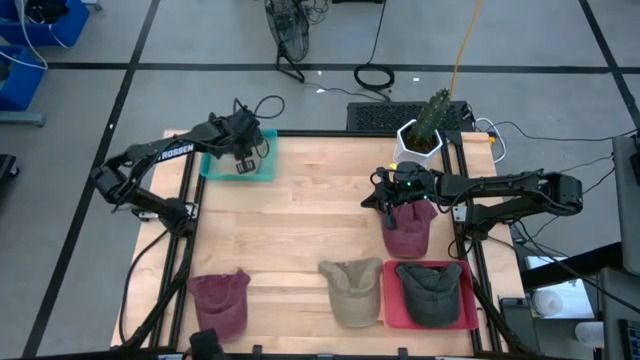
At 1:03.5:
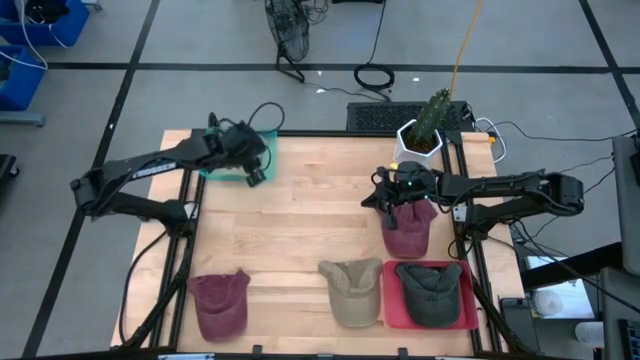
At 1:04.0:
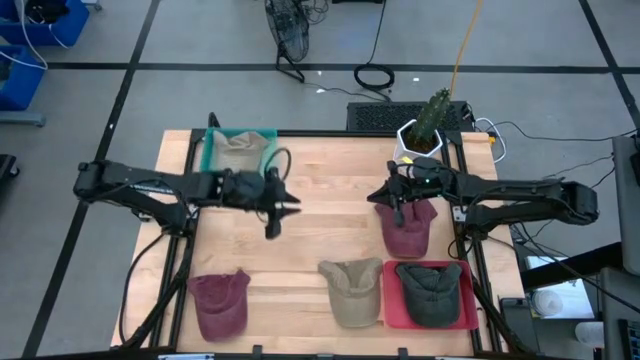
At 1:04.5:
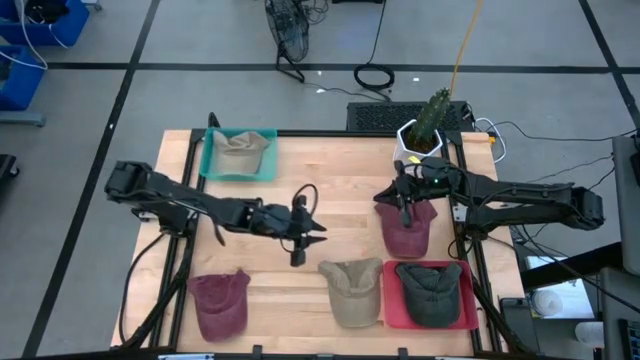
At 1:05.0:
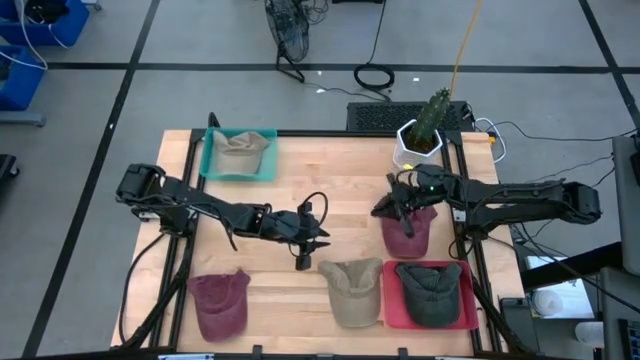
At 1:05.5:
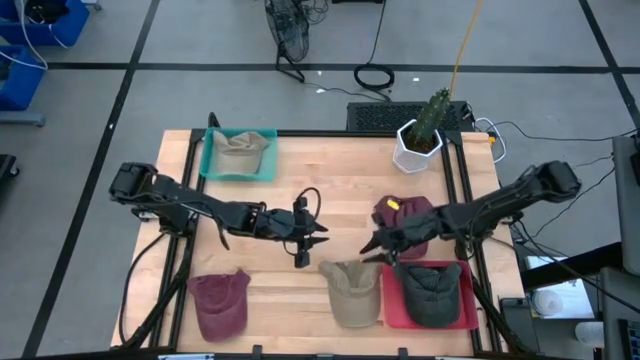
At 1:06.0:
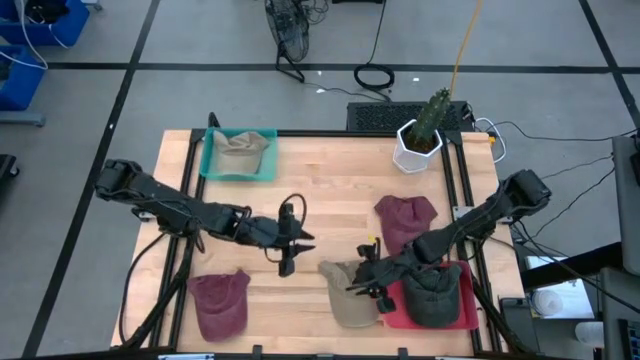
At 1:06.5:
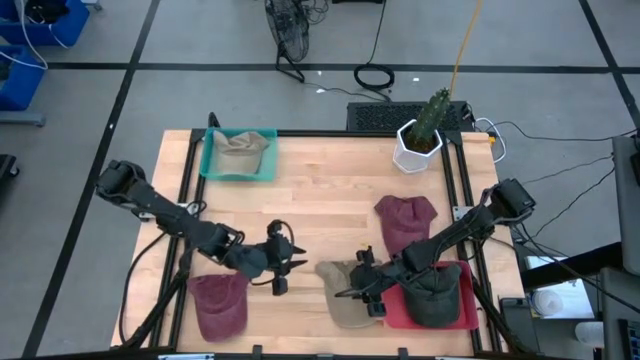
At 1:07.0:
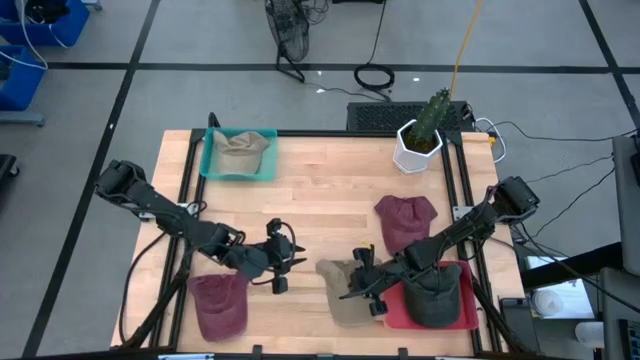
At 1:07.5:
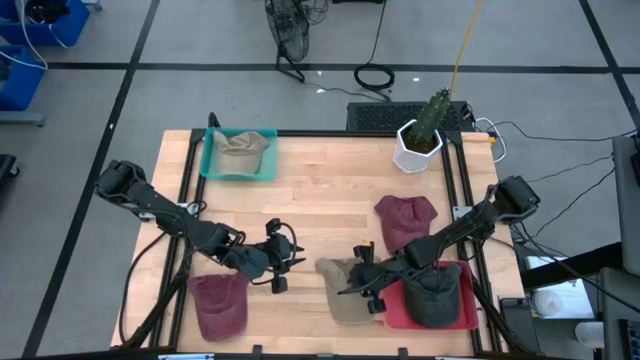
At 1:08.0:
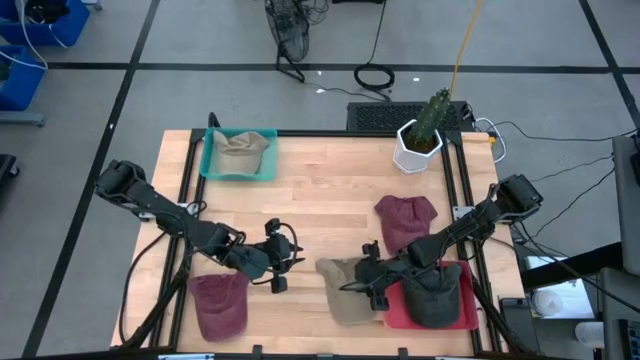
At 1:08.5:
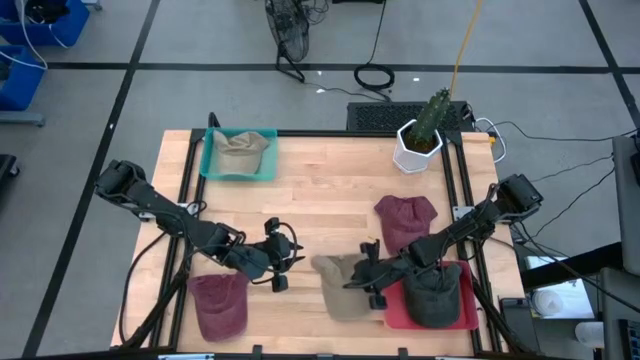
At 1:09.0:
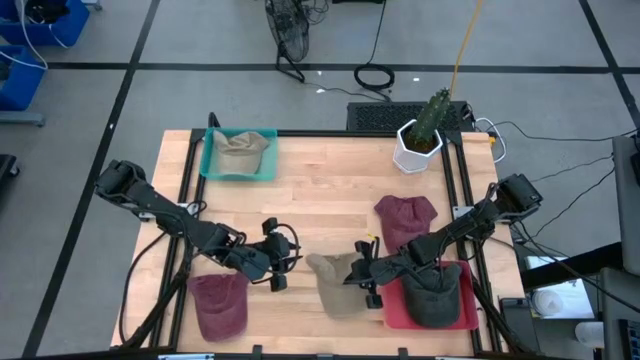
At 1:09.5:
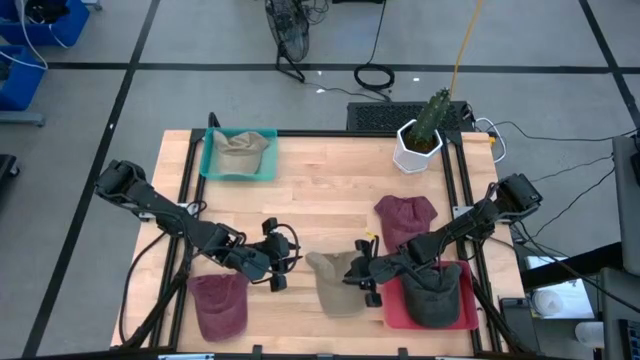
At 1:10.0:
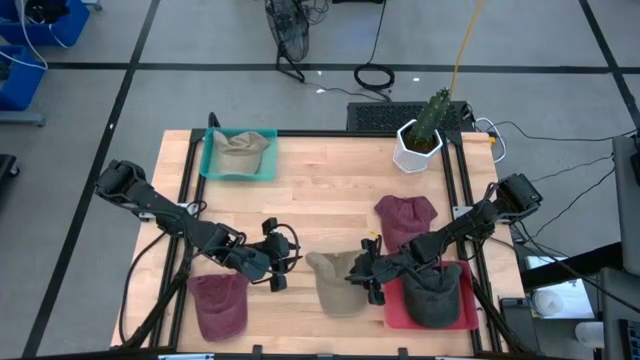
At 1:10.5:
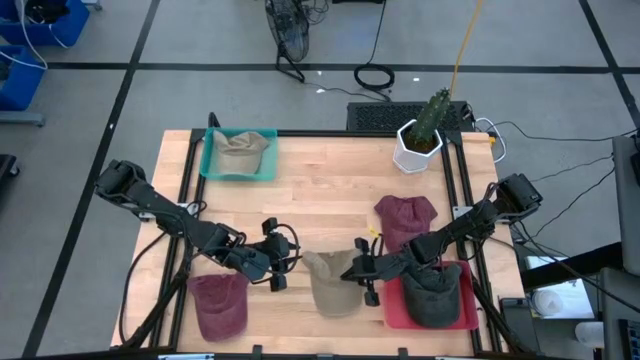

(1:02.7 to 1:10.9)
Task: Pick & Place hat
Put the brown cap into the green bin

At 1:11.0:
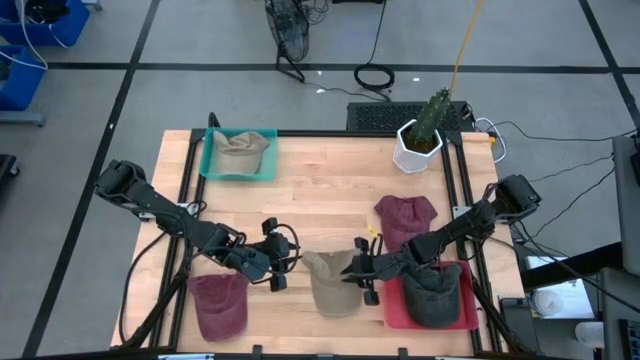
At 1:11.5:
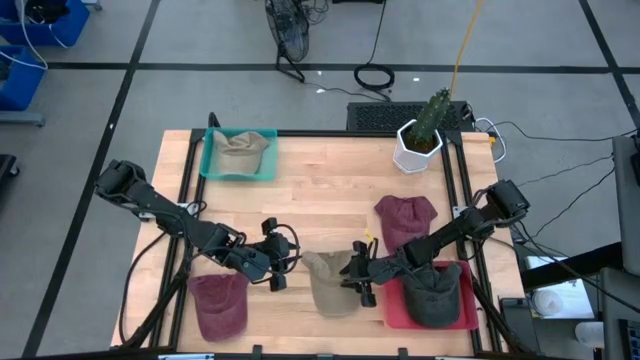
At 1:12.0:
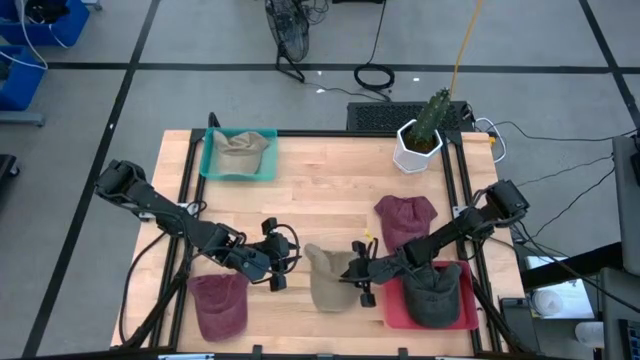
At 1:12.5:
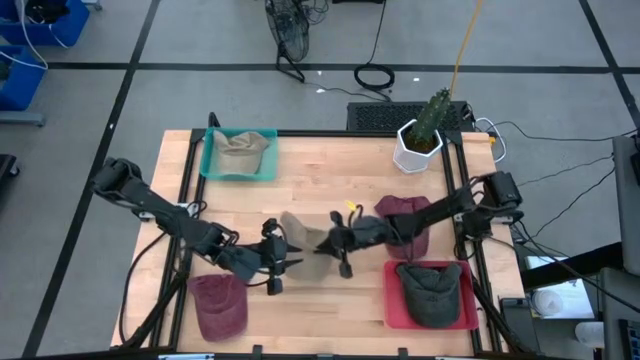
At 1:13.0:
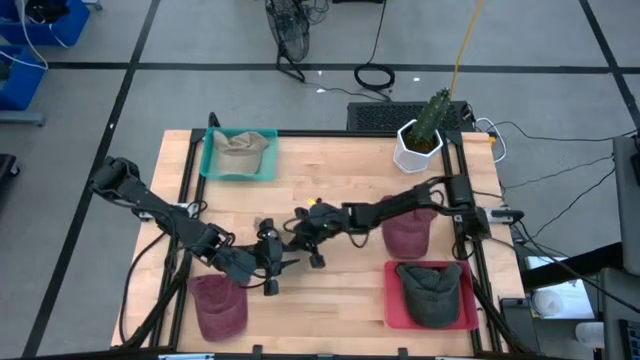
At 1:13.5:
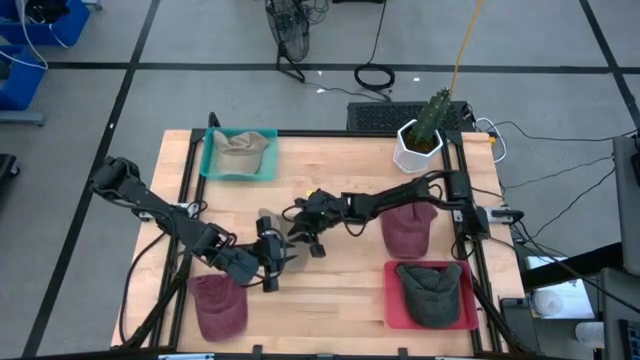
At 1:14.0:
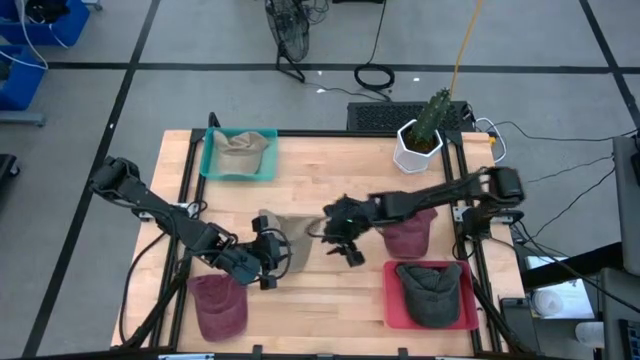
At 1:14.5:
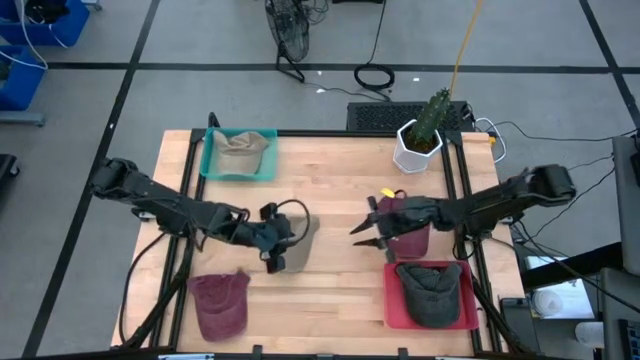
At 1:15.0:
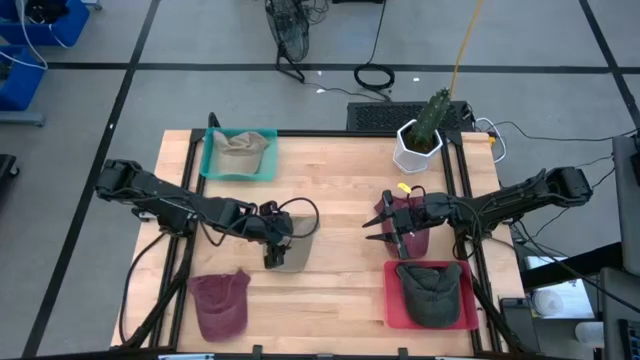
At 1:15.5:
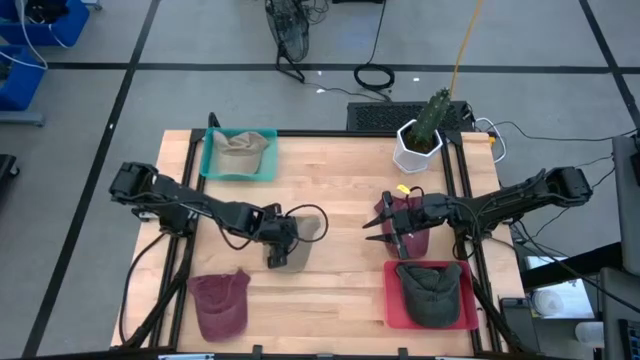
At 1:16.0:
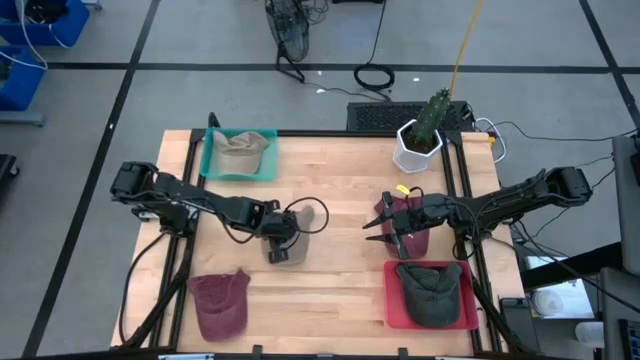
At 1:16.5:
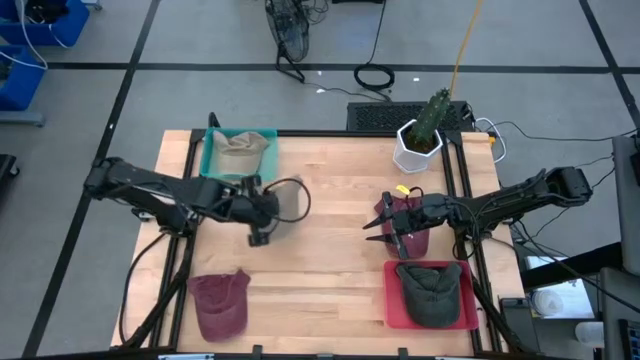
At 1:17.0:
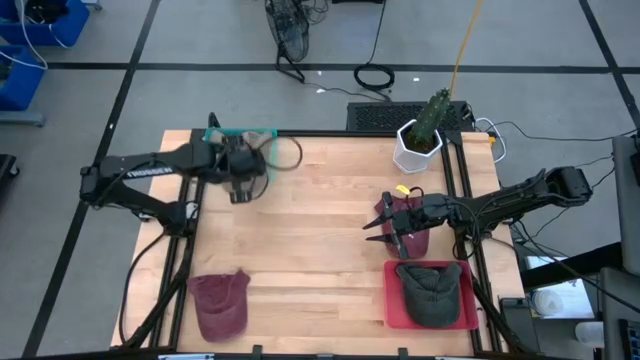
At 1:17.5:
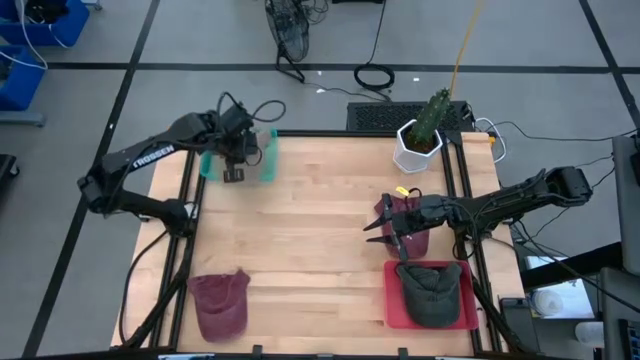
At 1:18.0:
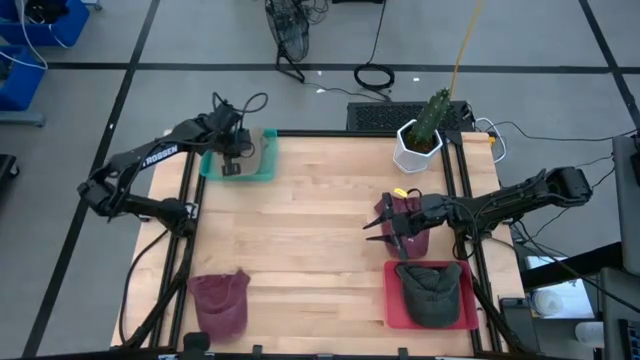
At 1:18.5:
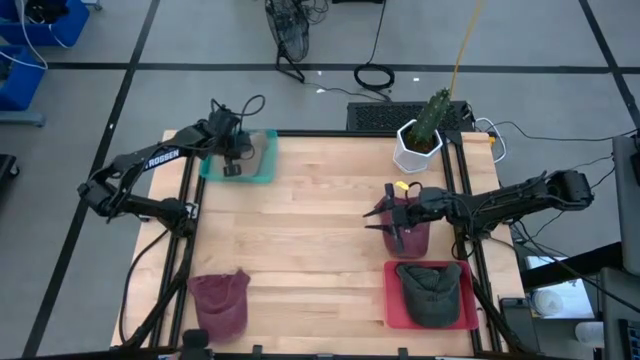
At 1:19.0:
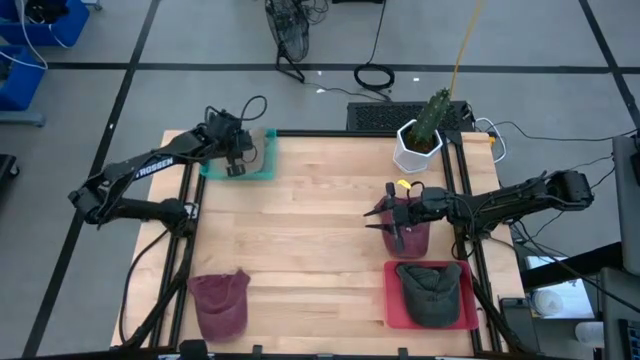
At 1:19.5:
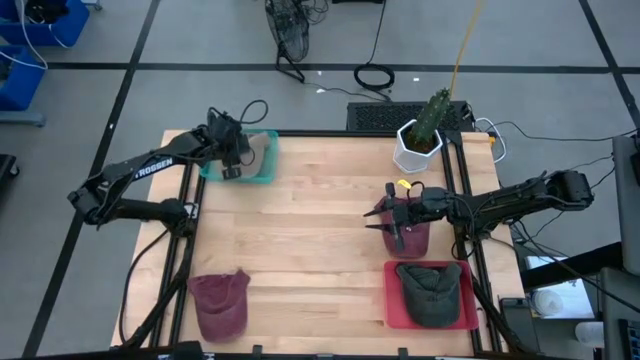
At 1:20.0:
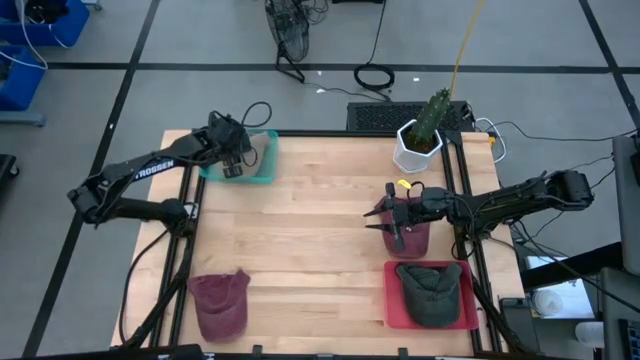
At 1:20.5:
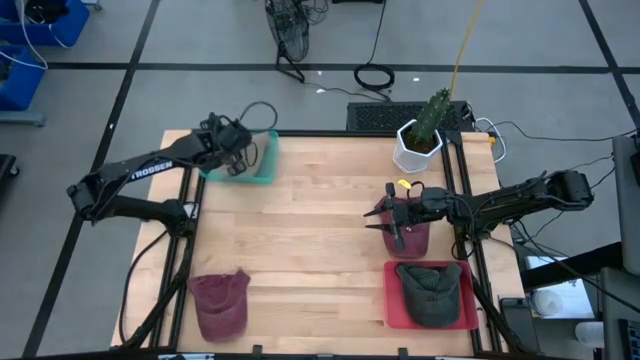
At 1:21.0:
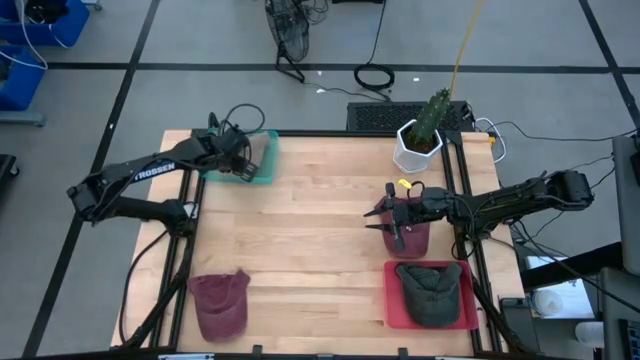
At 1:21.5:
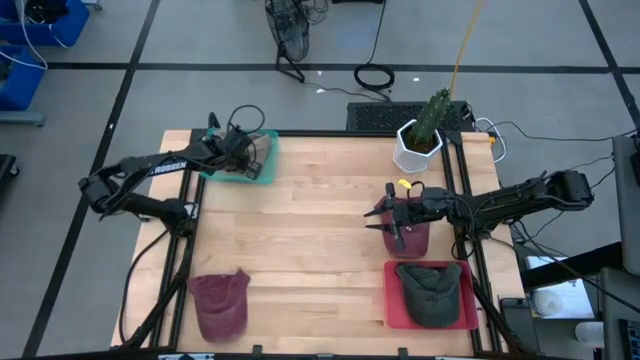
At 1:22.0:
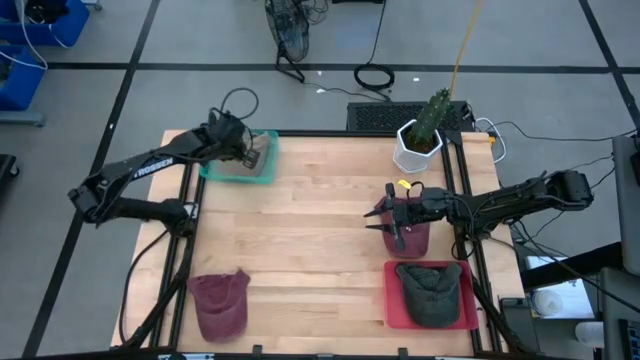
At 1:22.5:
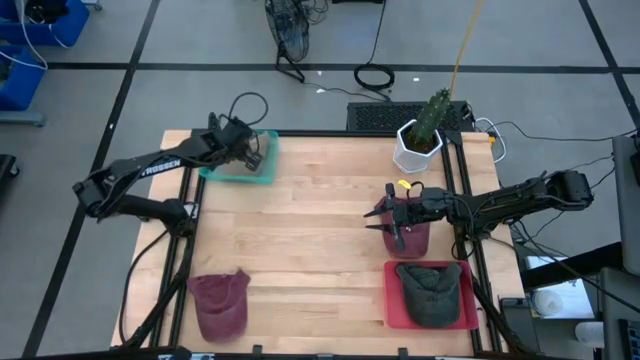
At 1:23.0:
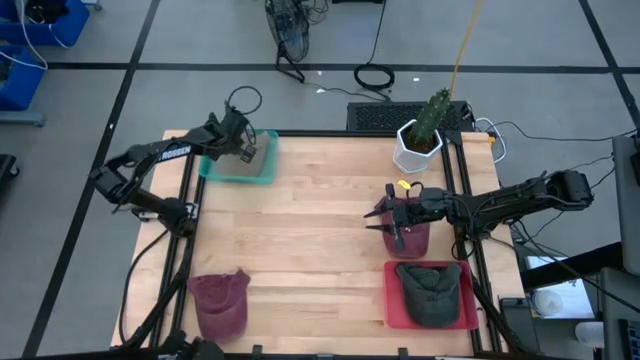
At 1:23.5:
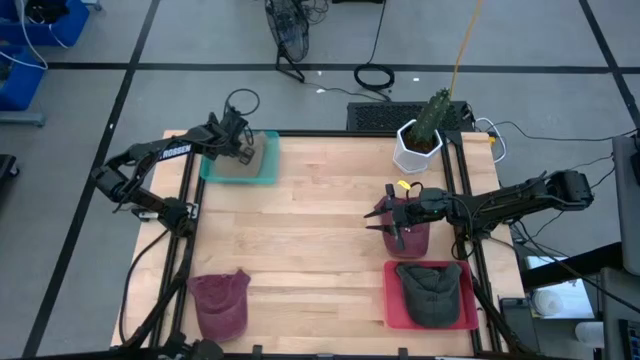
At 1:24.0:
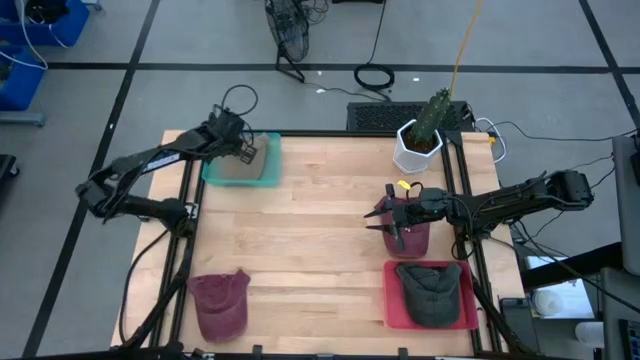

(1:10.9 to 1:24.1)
Put the brown cap into the green bin

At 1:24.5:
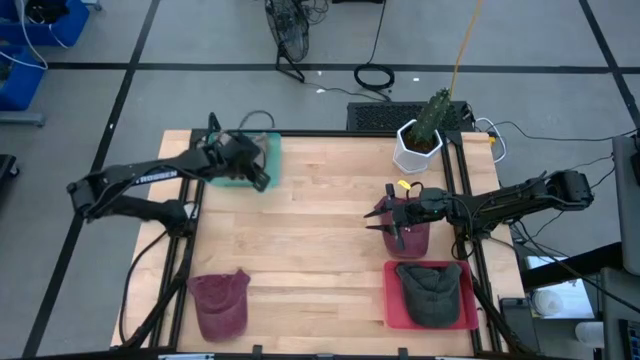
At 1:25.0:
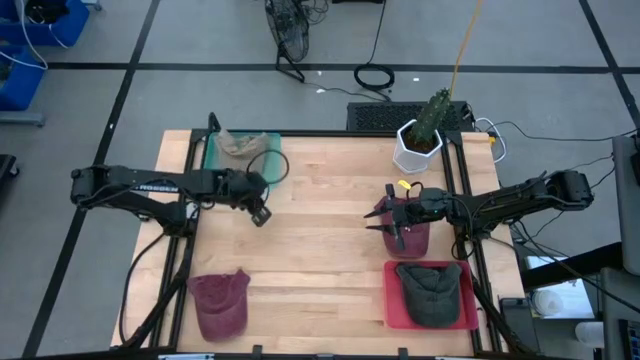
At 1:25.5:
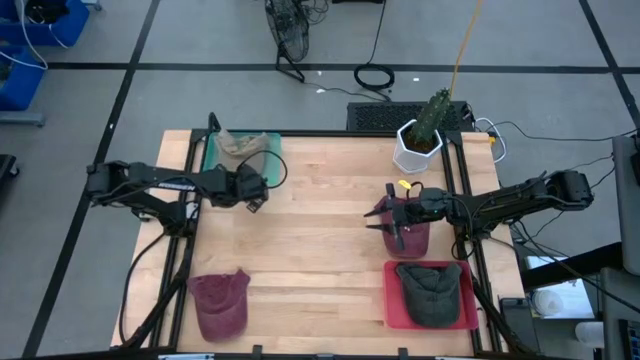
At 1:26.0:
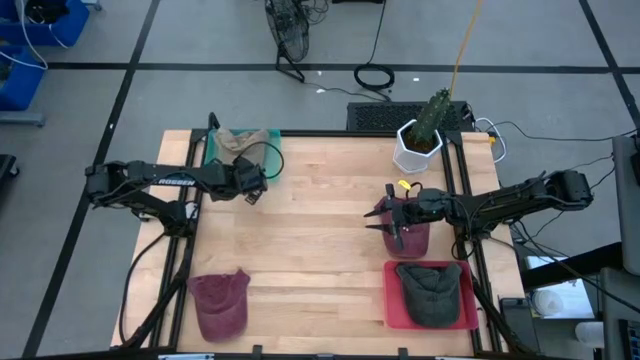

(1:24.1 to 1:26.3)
Adjust the green bin on the table
